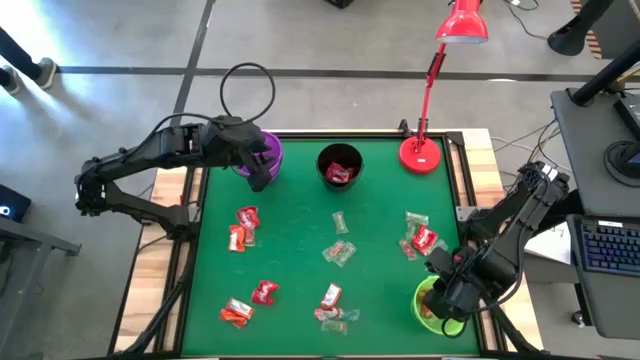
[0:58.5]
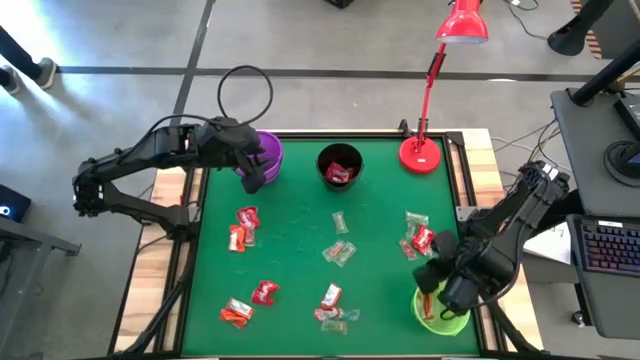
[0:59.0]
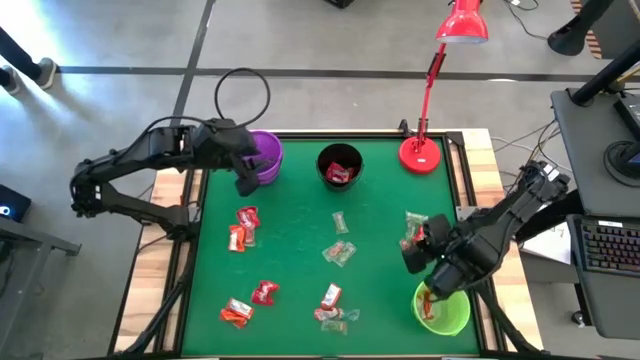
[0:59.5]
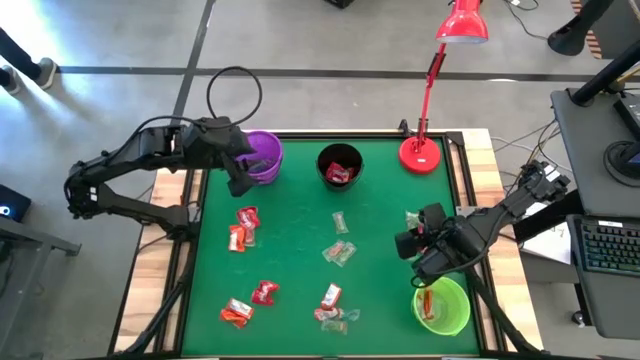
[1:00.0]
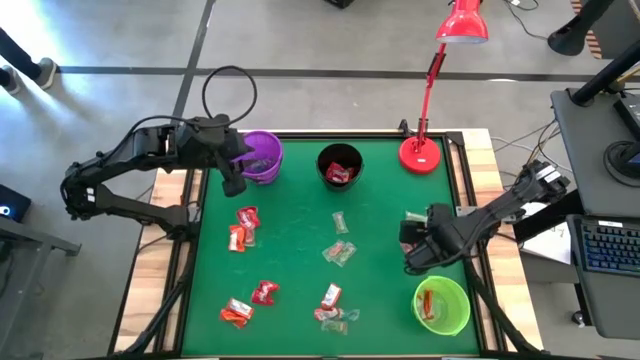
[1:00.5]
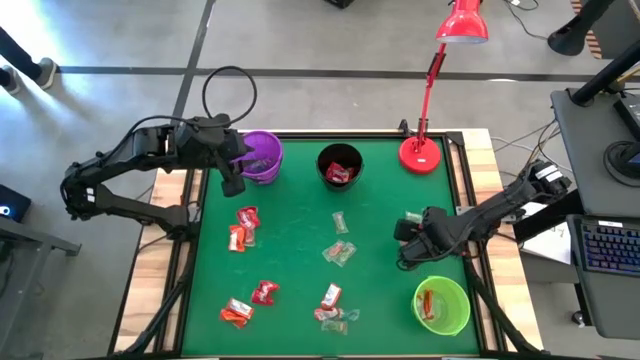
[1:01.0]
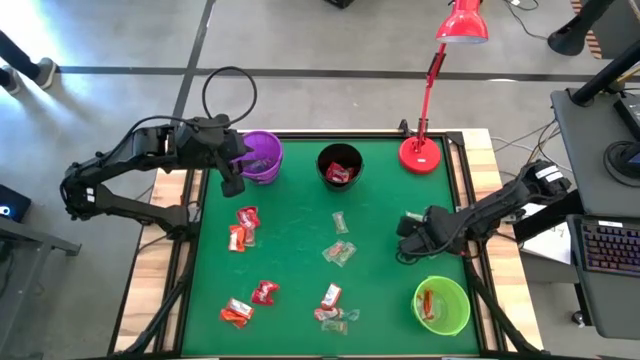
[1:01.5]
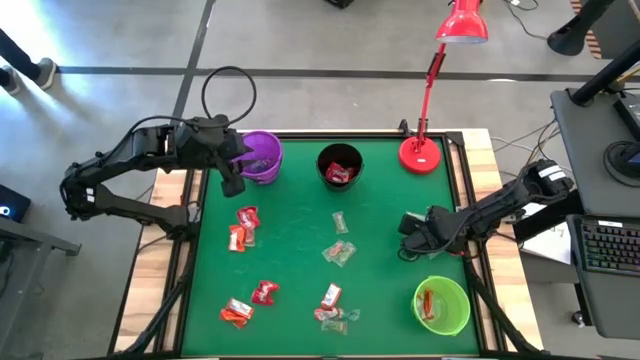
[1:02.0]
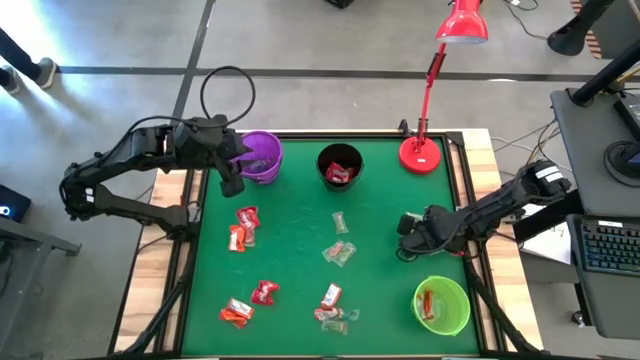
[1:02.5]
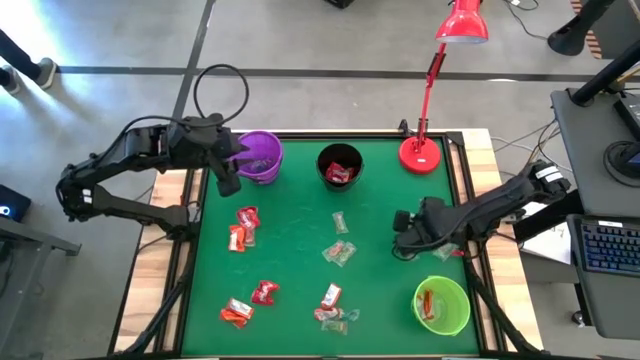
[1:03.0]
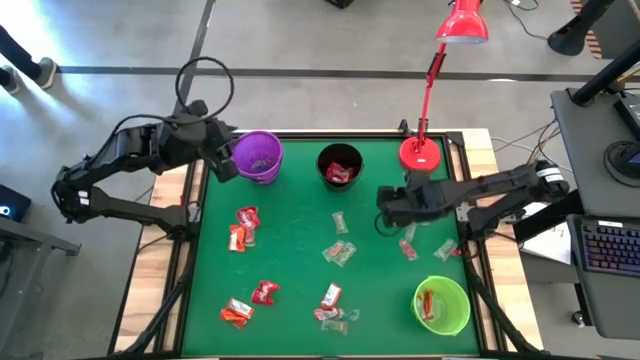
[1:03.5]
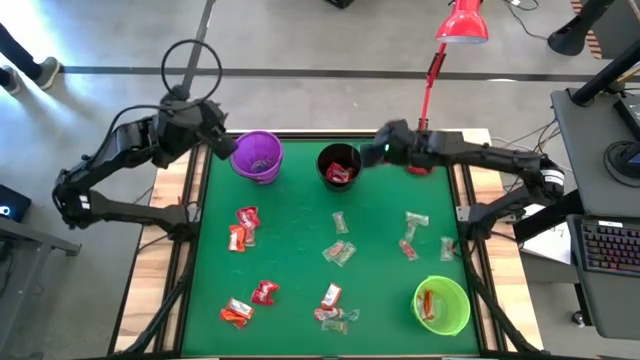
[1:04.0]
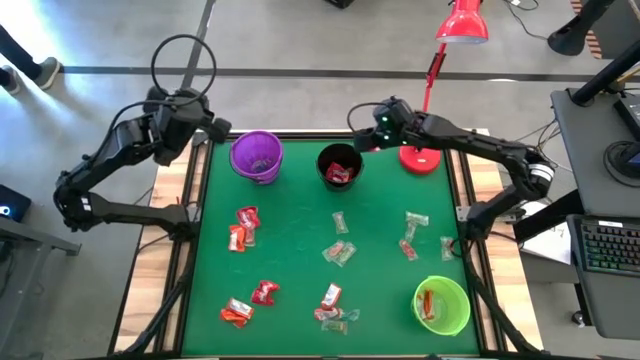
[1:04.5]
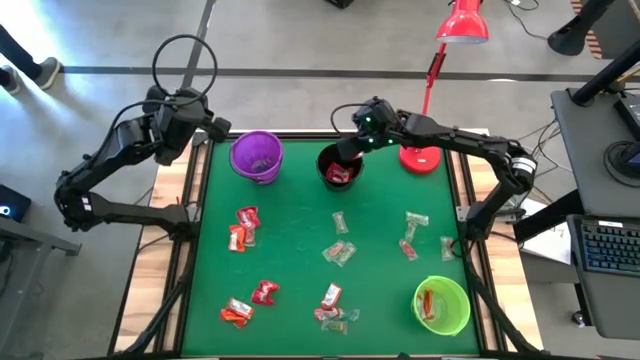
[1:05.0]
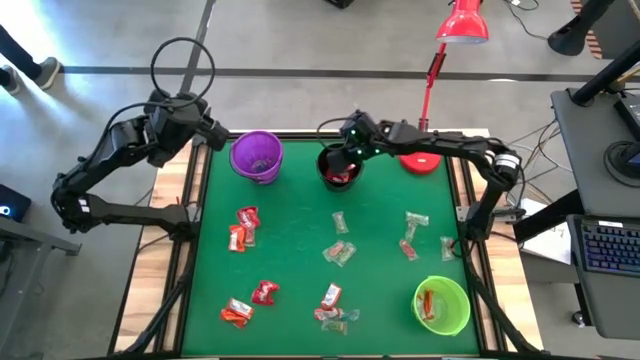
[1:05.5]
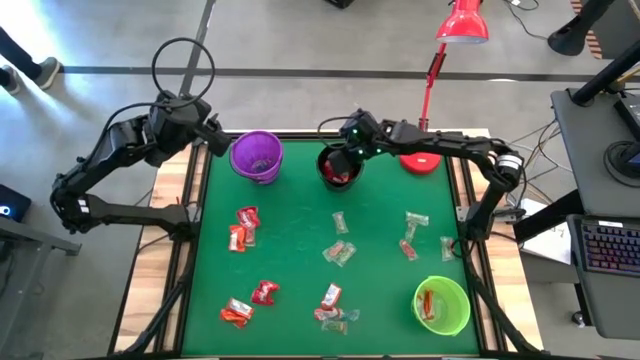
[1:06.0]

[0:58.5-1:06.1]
Task: Sort candy
Put the red candy pack into the black bucket

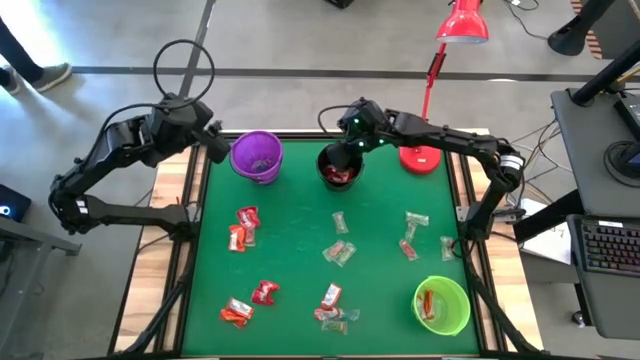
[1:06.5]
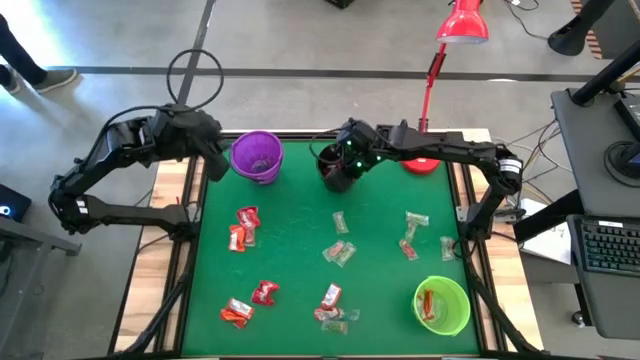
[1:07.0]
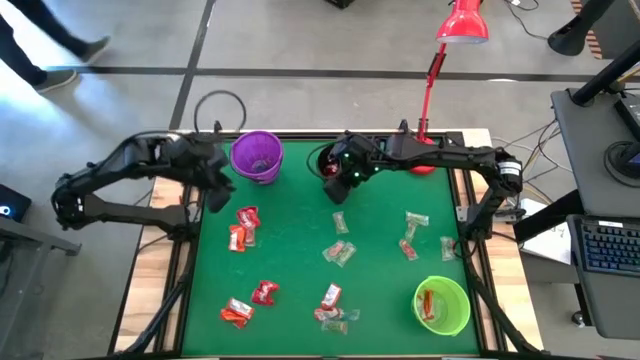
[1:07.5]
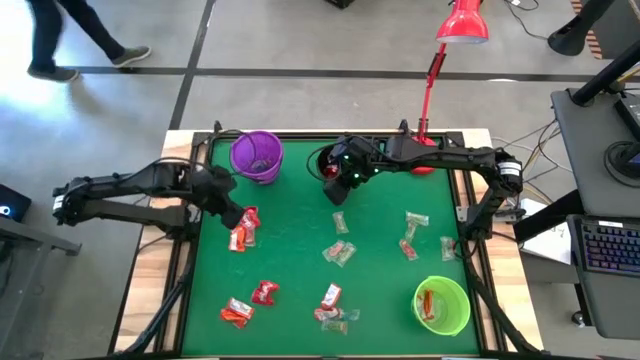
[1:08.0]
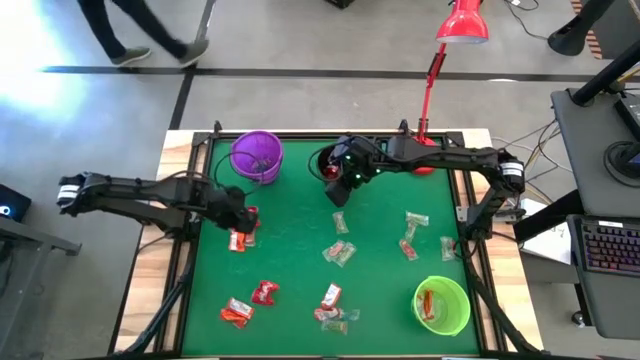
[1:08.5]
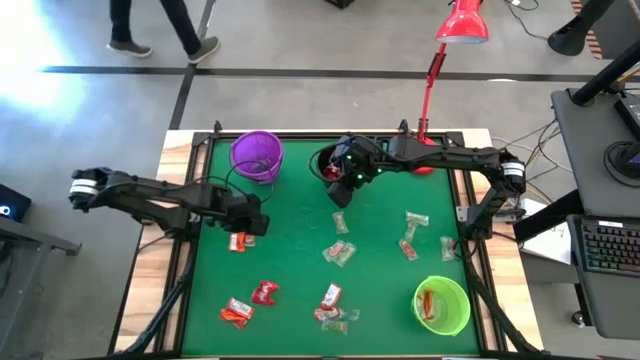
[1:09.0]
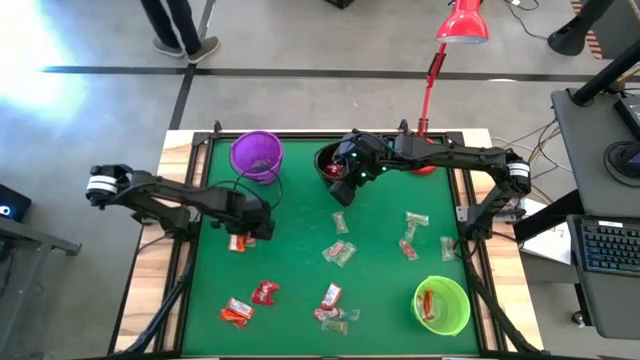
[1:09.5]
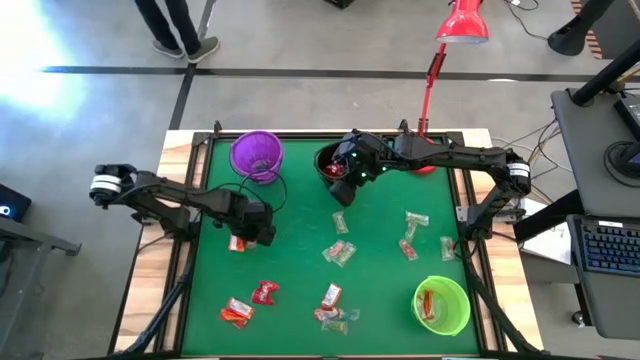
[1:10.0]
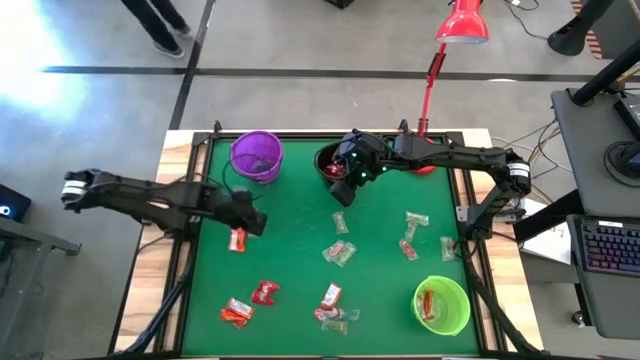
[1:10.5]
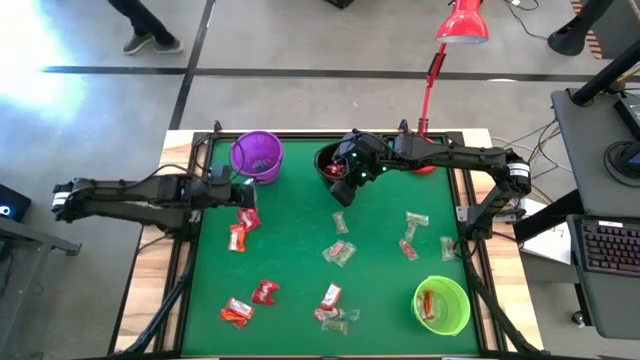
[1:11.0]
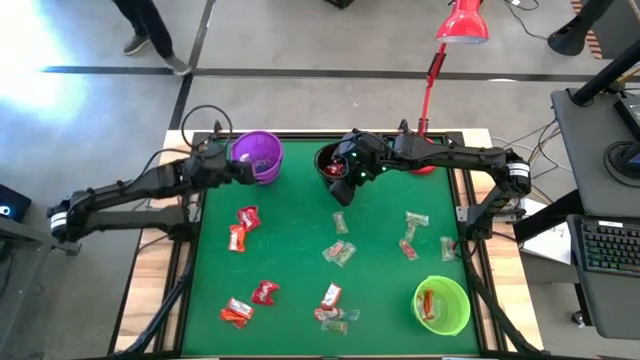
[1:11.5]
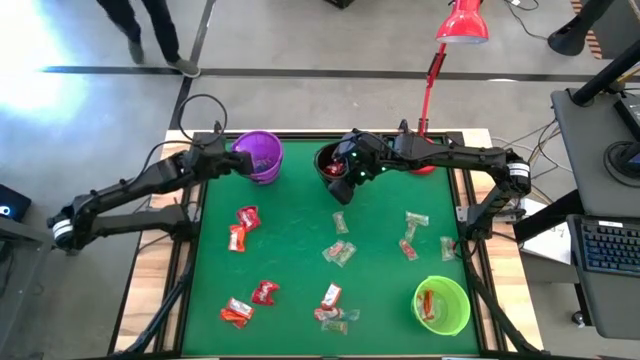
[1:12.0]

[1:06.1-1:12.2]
Put the red gummy into the violet bucket

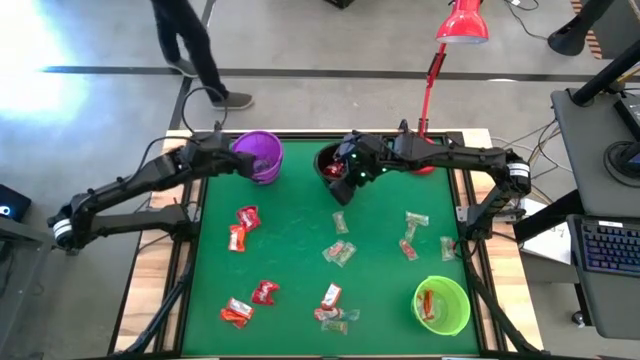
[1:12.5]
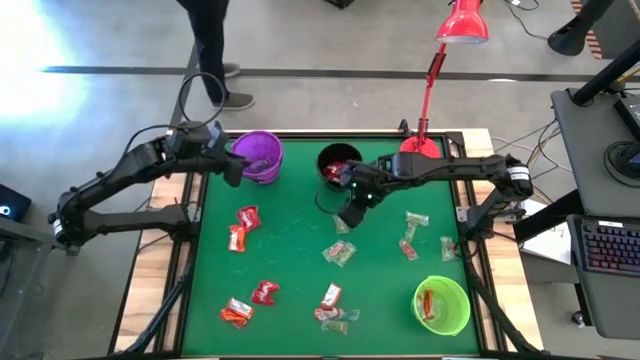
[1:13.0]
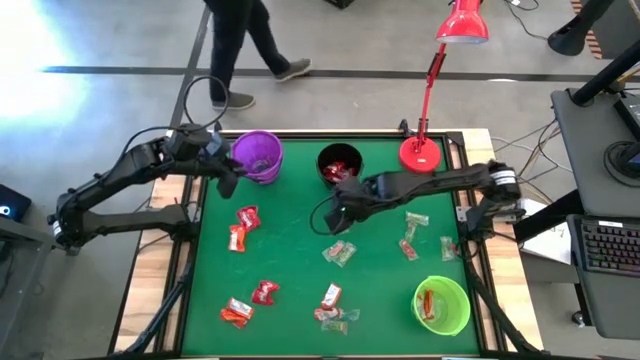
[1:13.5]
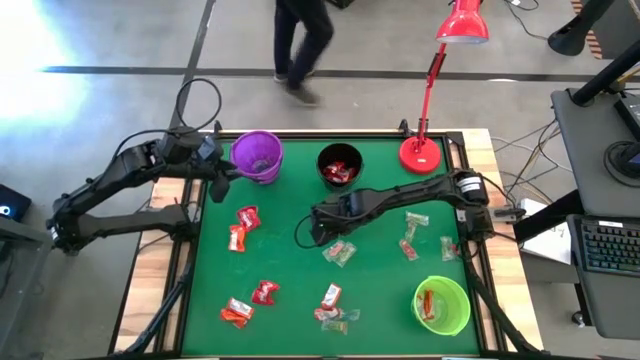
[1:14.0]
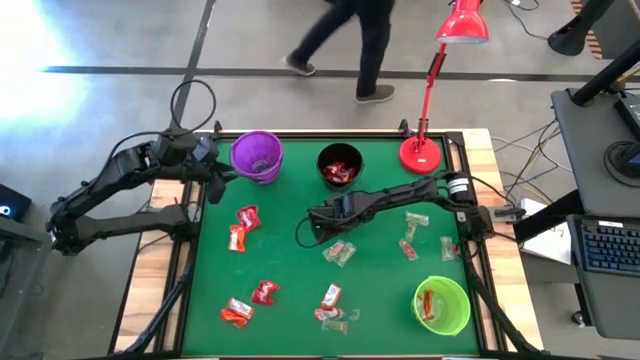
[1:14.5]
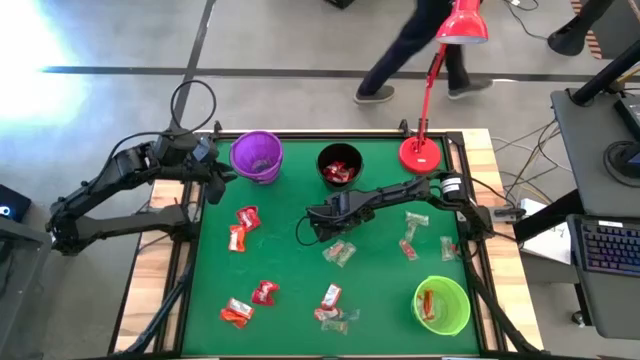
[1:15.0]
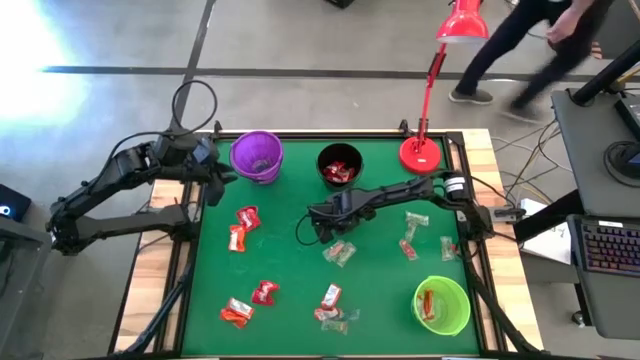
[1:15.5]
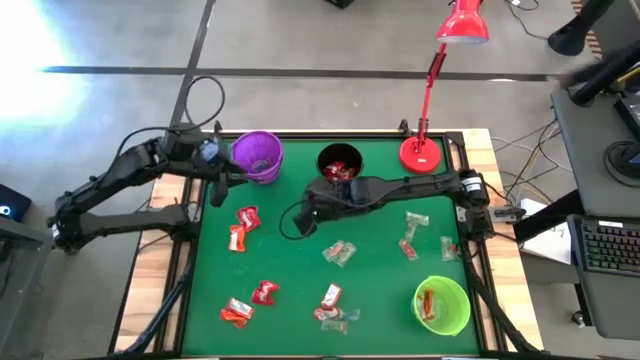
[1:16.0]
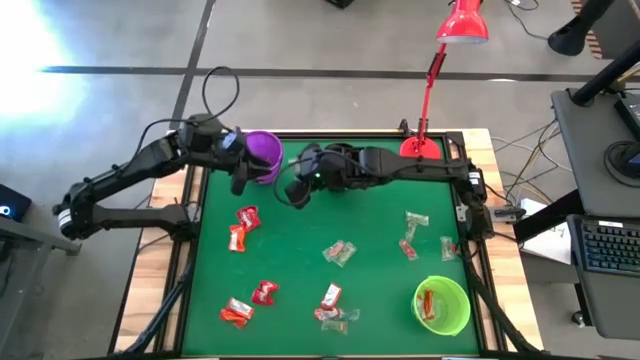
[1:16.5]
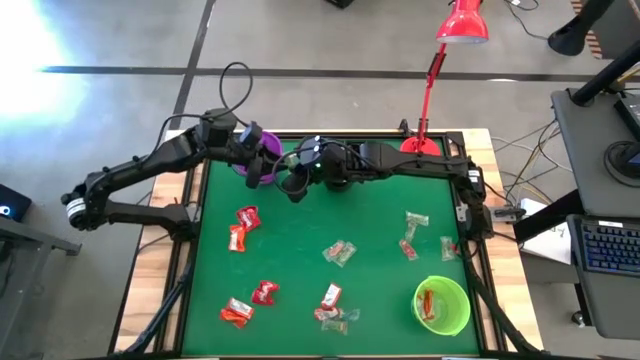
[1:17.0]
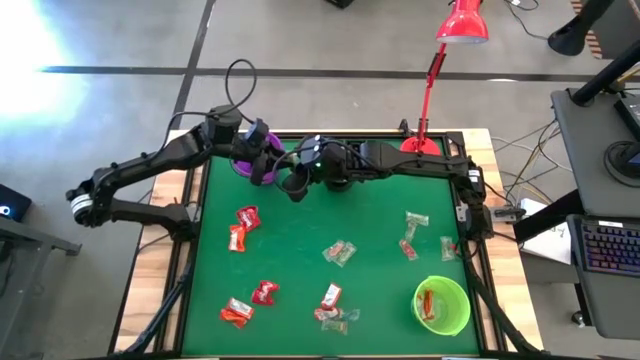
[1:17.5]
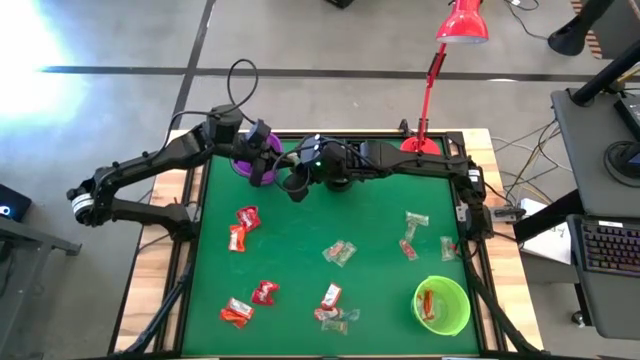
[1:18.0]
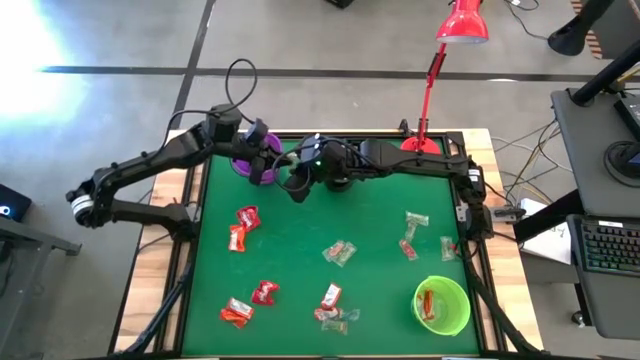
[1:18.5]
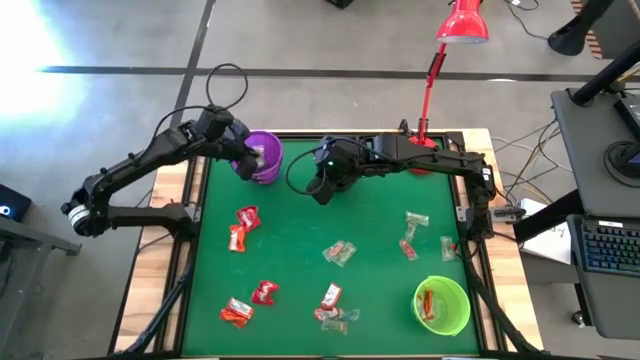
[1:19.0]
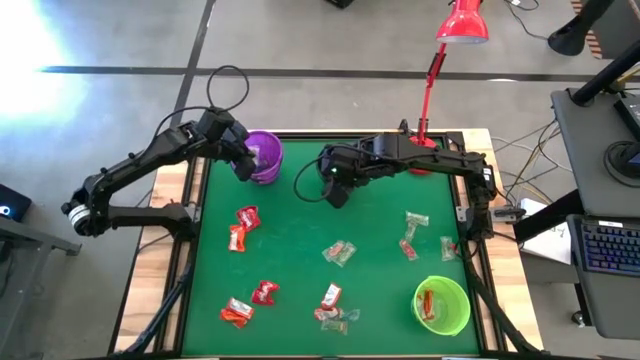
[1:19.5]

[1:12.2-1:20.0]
Put the green gummy into the violet bucket
